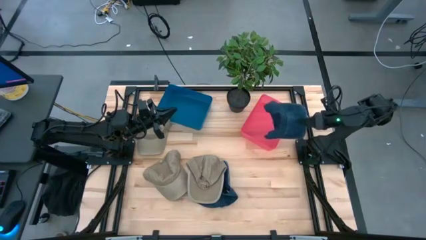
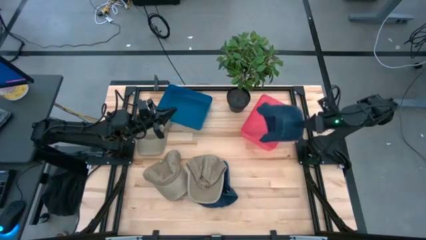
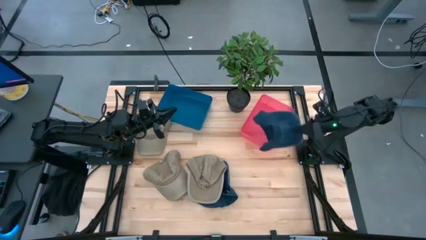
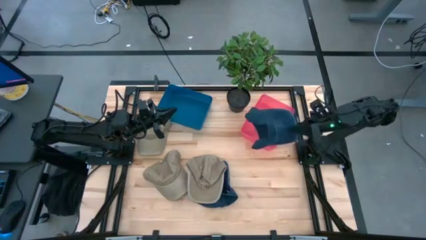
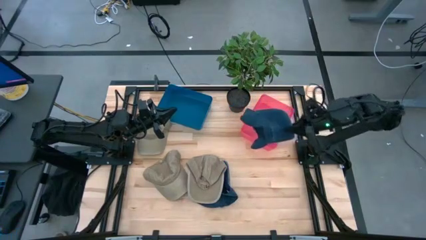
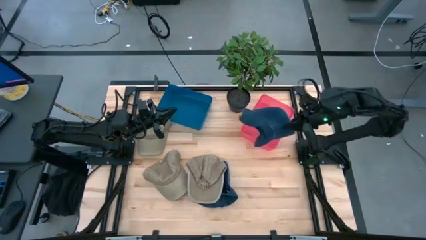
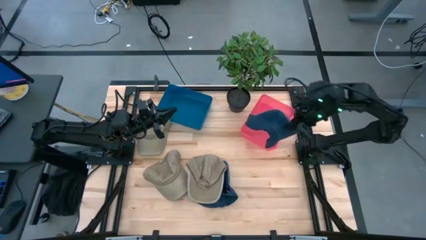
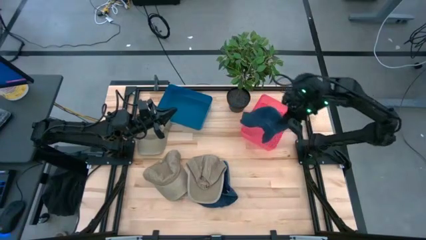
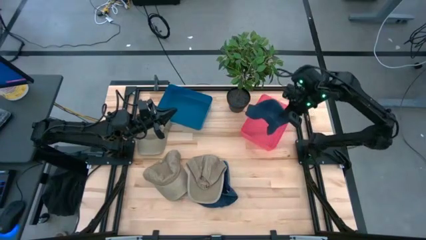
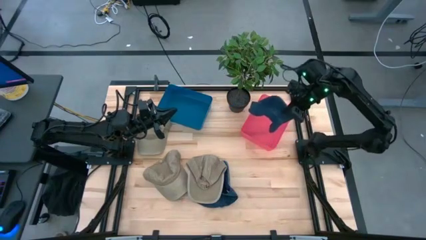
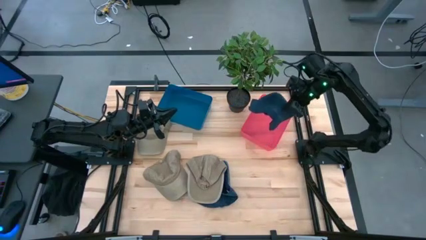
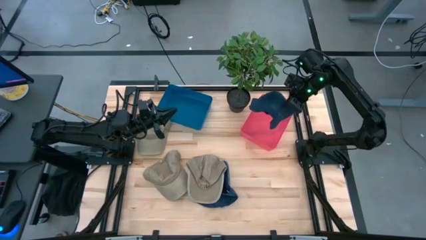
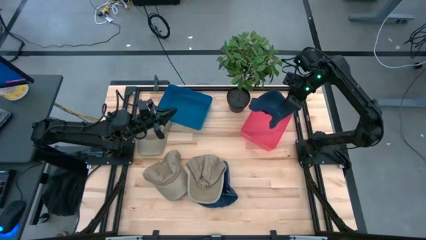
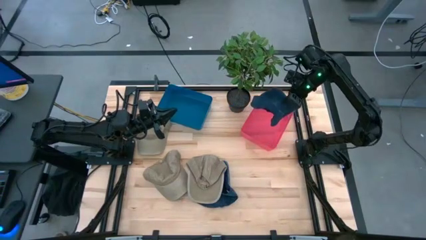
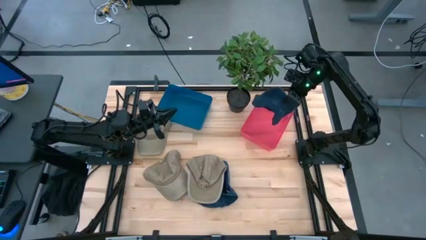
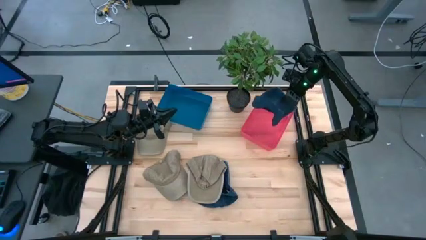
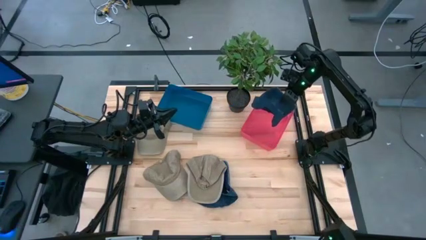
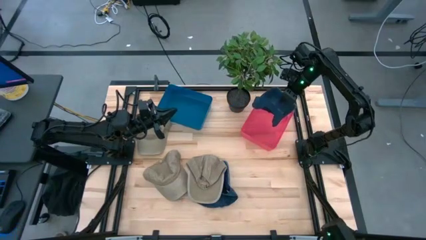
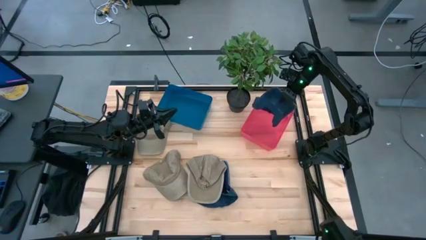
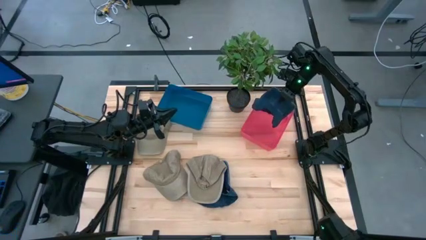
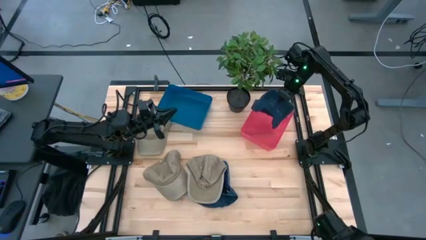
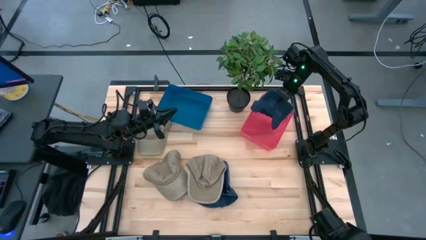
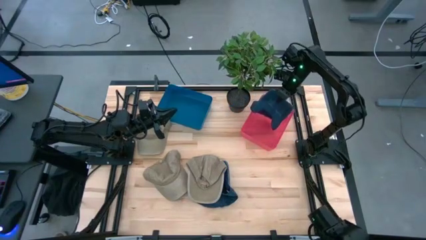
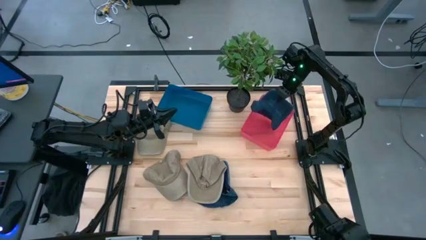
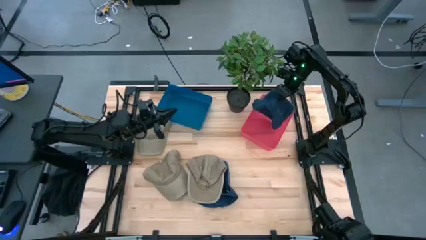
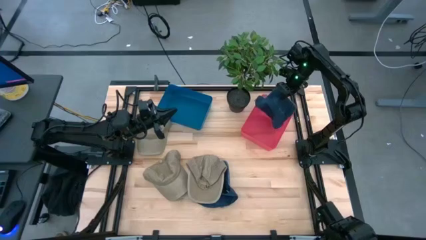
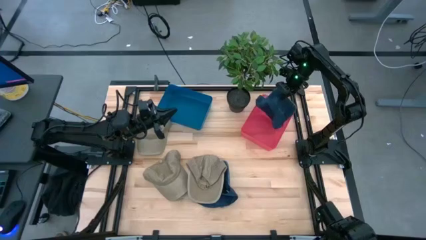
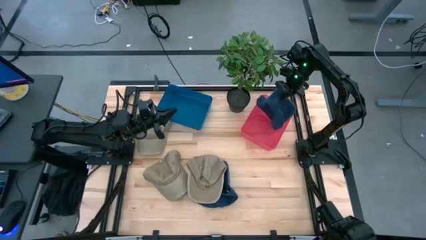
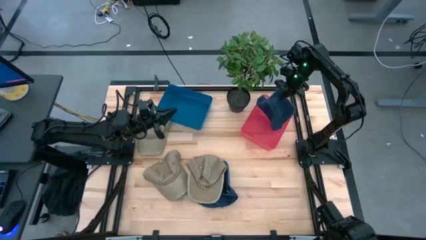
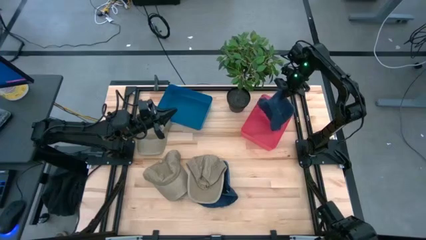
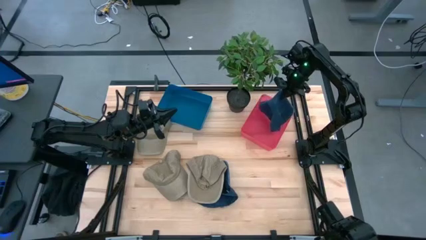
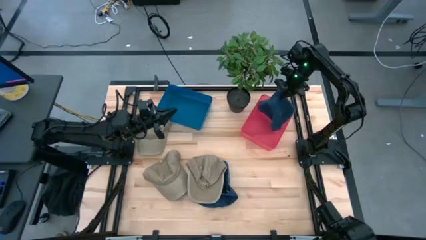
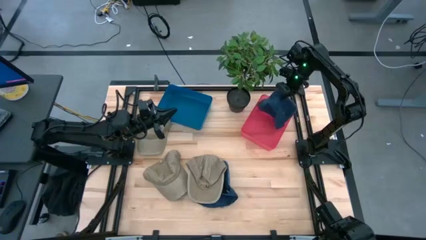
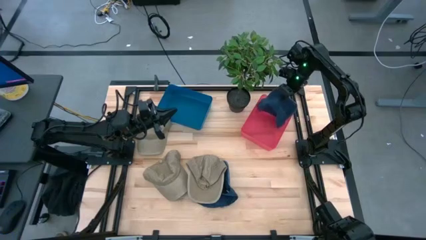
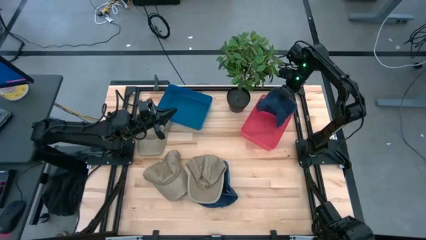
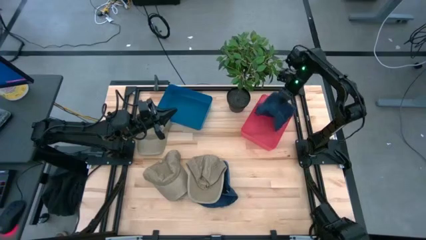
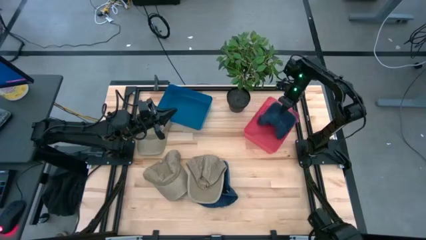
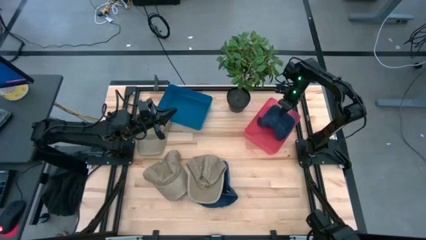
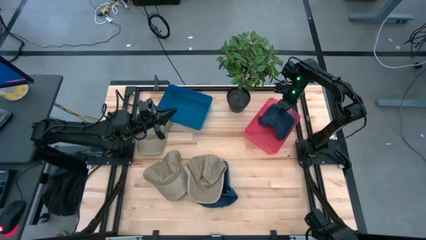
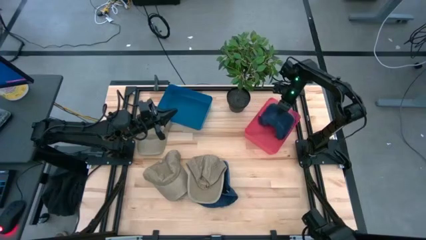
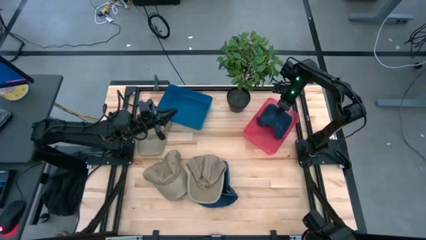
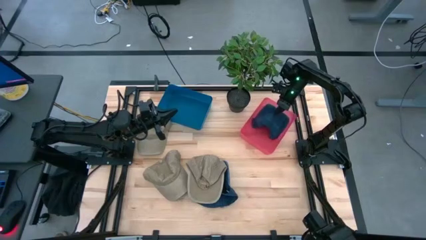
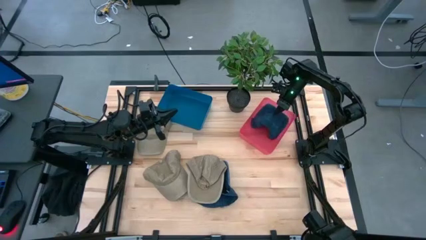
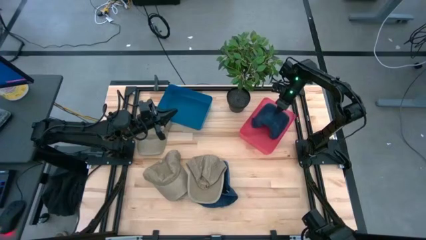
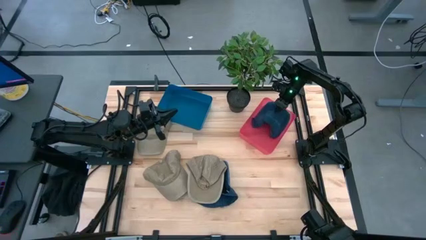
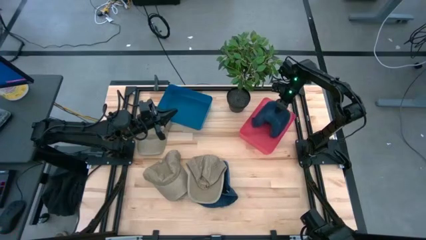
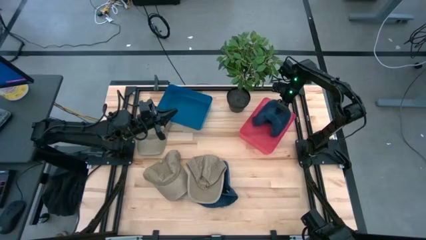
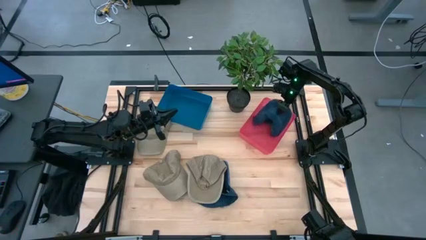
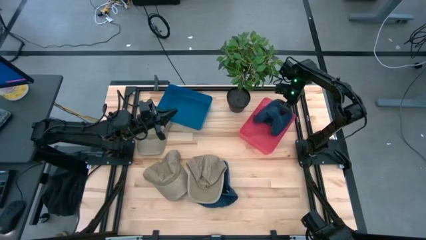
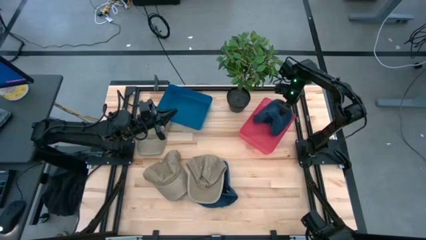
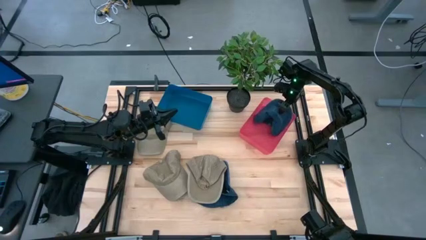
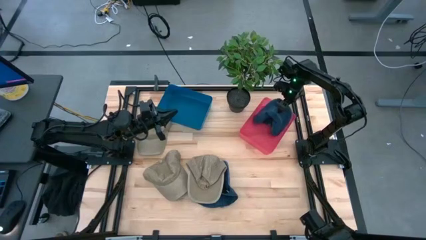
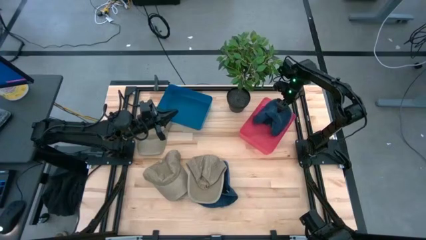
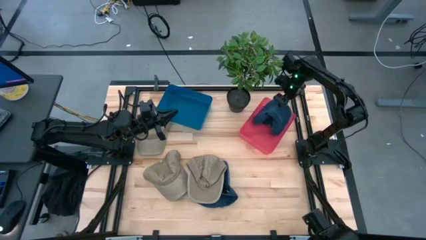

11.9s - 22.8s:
Task: Pick & Place hat
Put the right blue cap into the red bin
